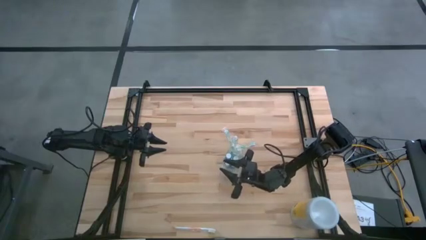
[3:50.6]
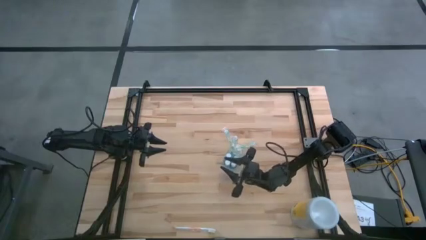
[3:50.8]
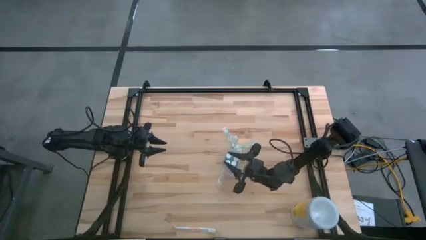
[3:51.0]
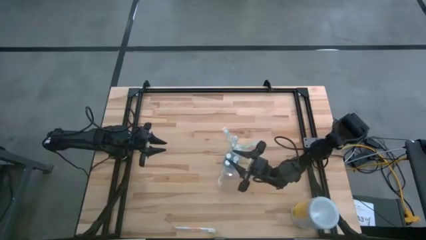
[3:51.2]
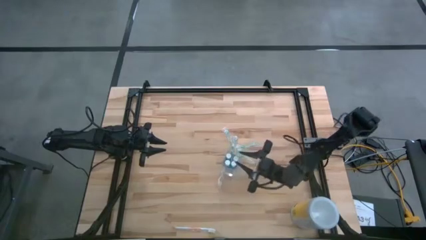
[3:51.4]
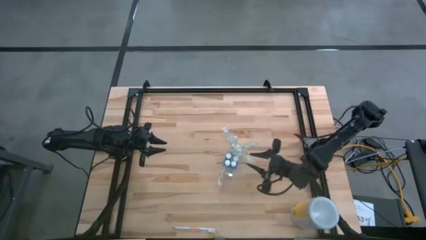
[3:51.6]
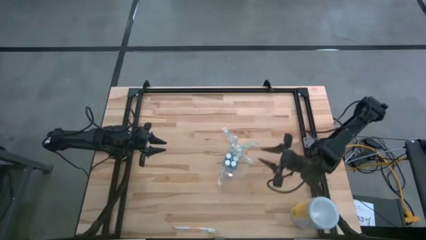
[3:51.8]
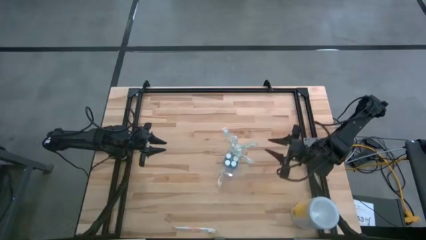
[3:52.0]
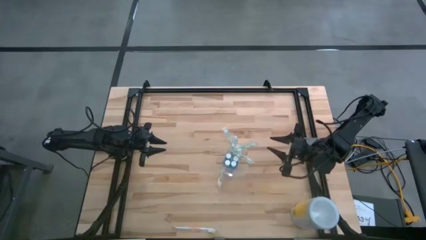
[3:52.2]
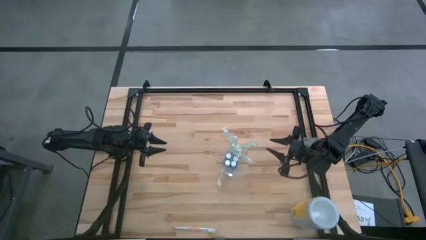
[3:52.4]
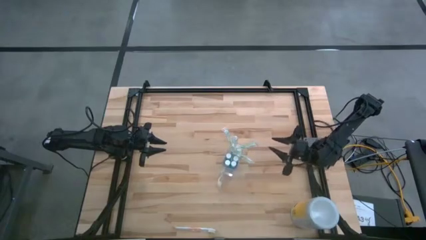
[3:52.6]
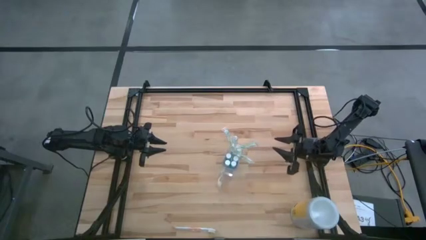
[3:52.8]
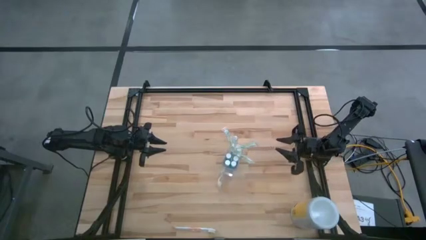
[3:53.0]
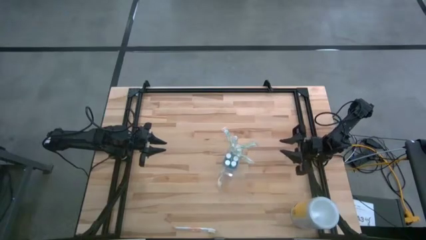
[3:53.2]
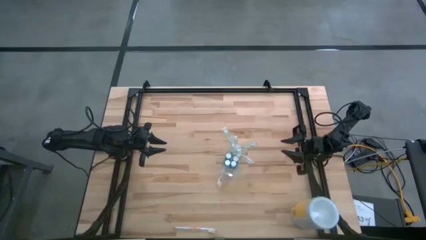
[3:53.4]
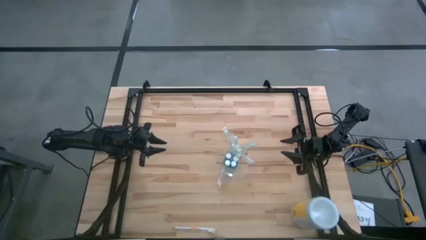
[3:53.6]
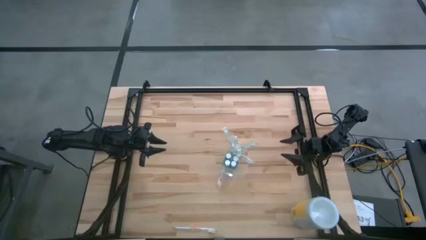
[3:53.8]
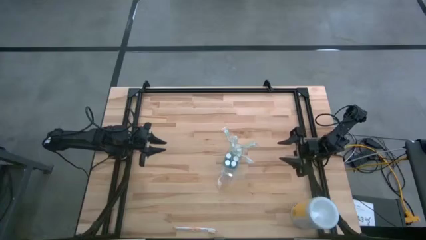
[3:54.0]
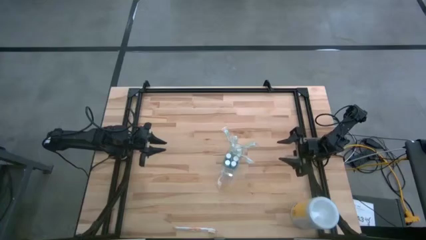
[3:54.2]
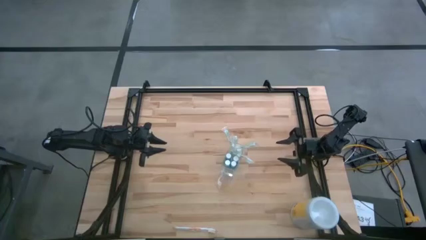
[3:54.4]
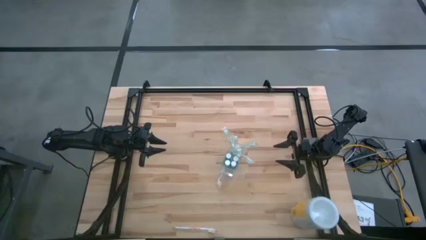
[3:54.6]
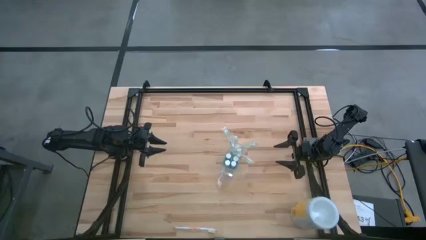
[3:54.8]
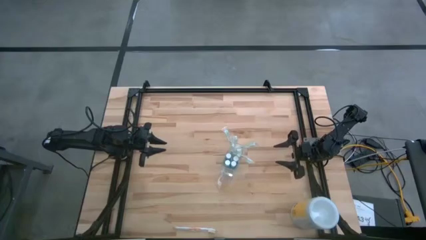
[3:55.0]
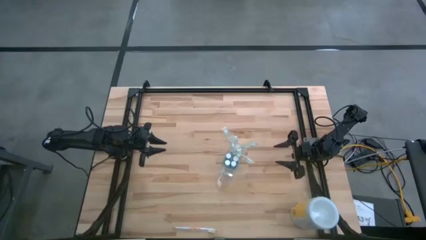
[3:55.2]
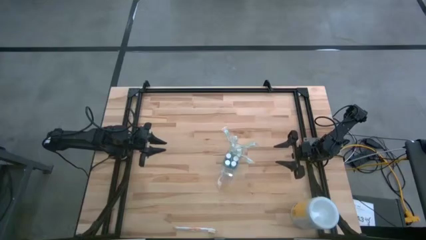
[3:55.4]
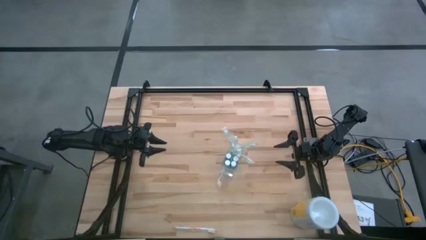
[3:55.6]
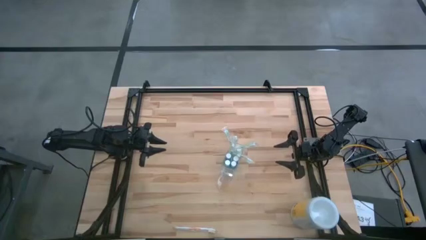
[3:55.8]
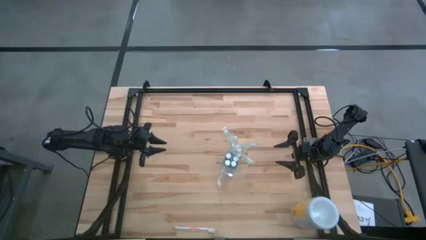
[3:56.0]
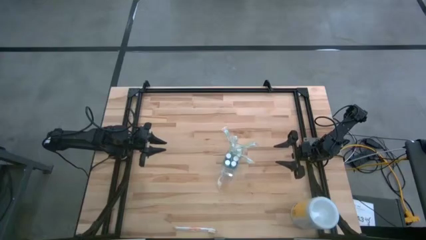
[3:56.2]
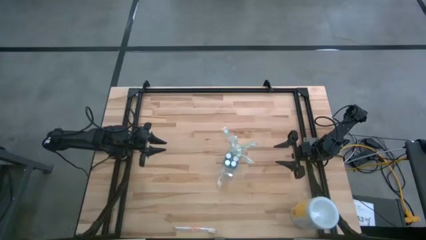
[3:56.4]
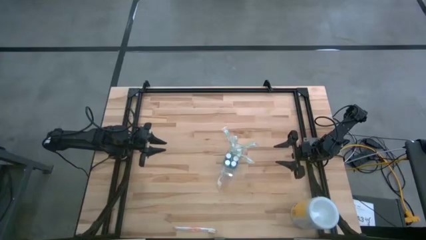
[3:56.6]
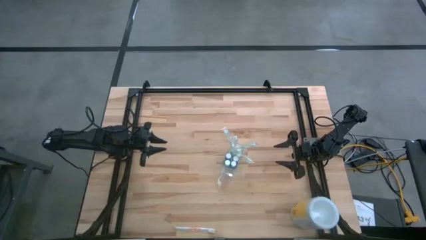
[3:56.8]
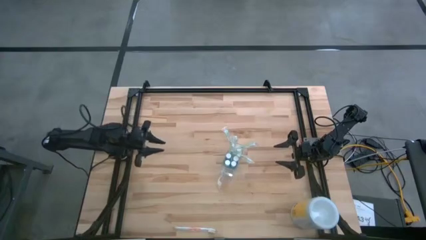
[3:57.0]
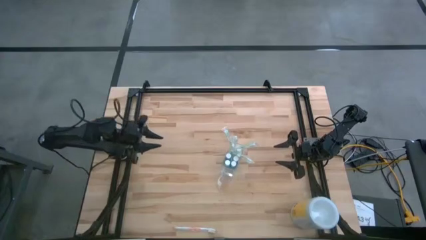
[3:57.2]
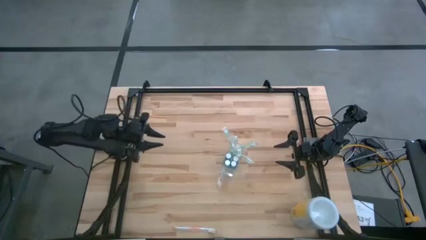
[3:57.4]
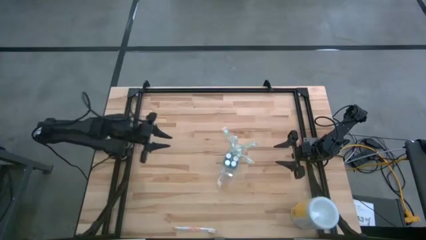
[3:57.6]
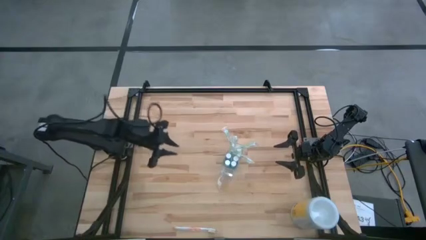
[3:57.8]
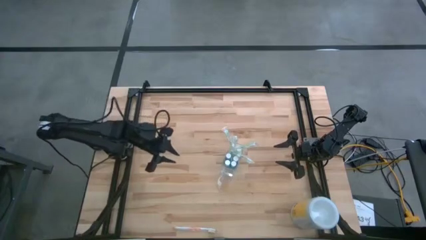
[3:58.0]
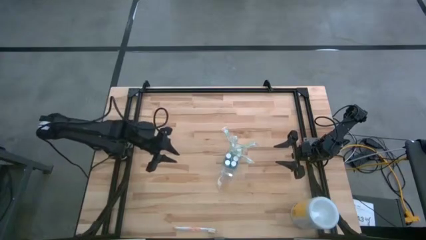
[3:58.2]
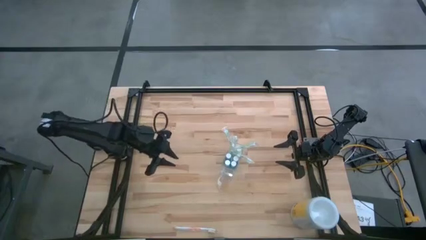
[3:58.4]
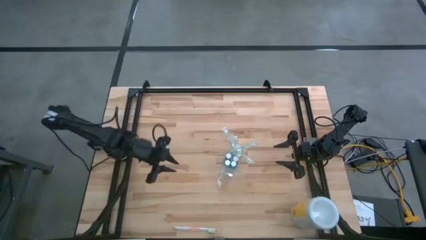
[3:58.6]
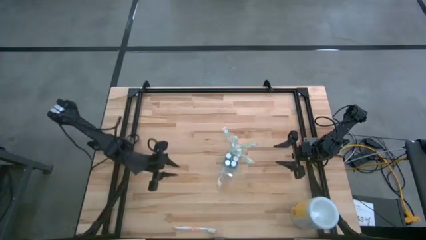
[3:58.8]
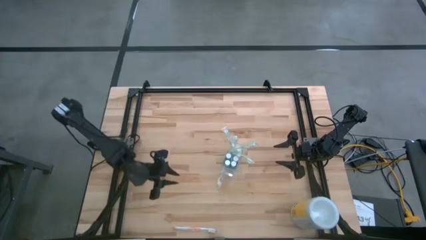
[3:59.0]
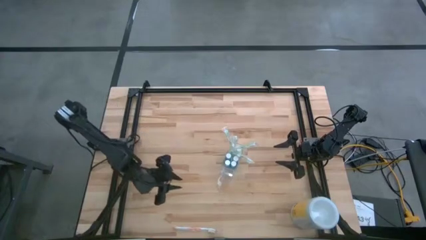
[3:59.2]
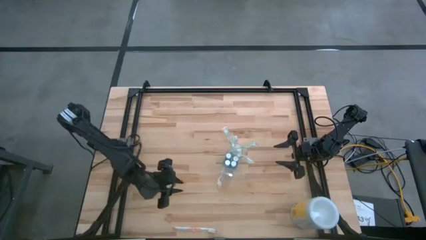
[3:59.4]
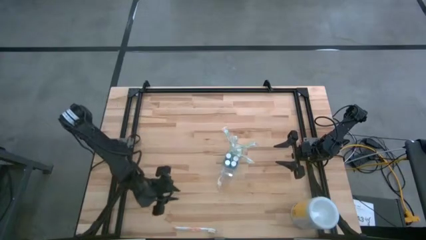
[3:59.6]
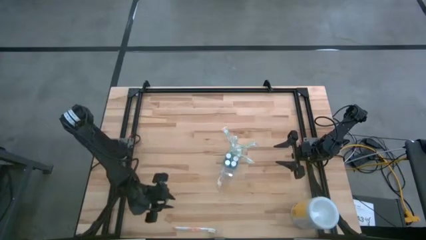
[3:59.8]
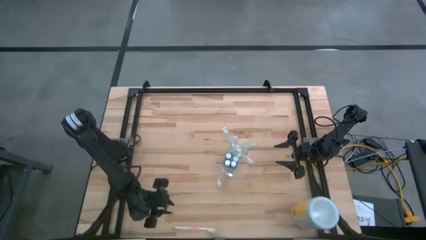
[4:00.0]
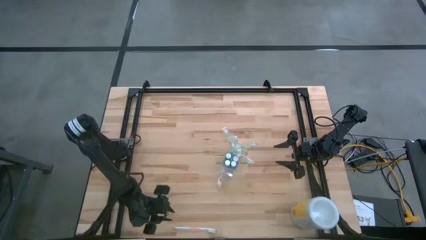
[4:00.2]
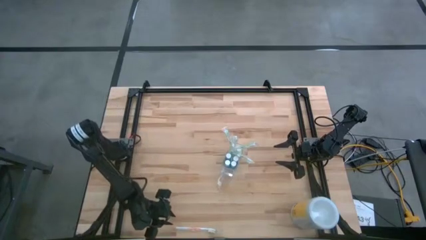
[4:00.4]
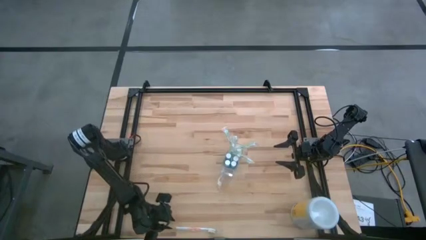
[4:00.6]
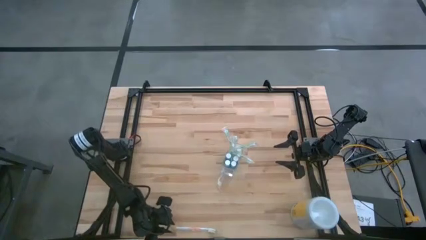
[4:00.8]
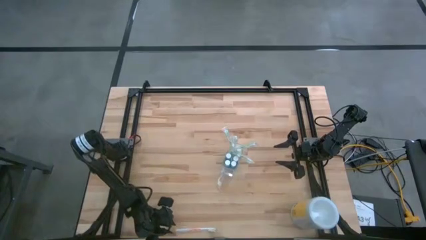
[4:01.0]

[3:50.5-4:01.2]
Task: Pick & Place toothbrushing station
Put the white orange toothbrush into the front side of the transparent organizer

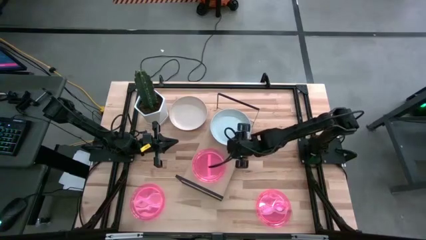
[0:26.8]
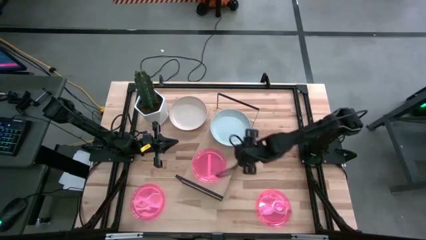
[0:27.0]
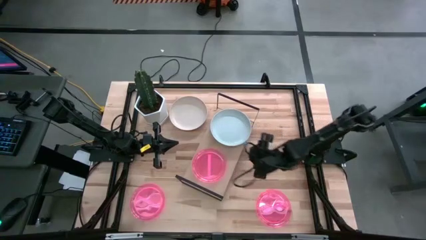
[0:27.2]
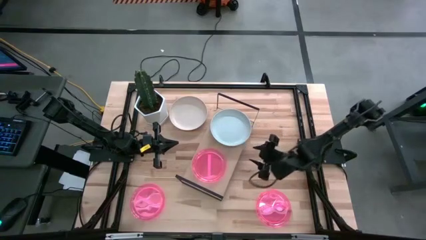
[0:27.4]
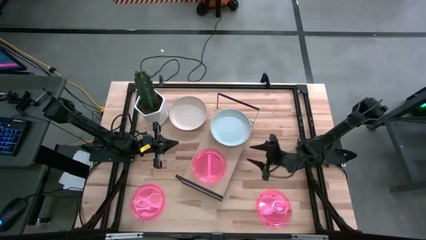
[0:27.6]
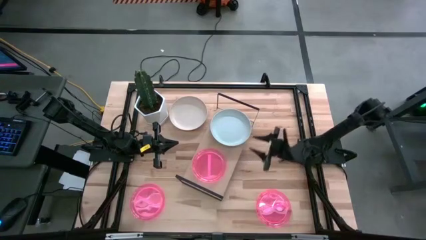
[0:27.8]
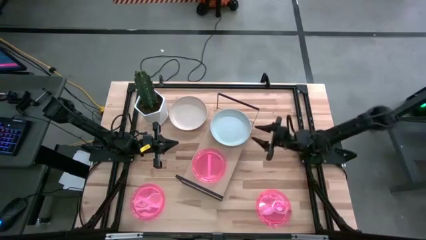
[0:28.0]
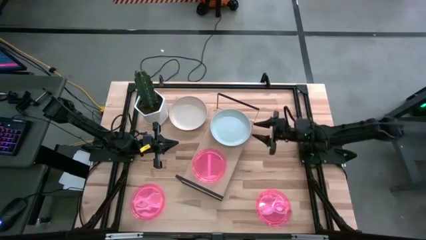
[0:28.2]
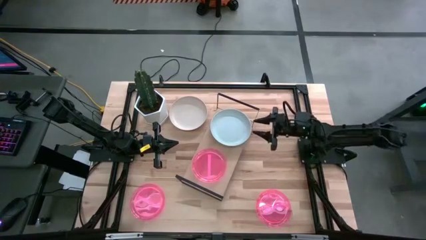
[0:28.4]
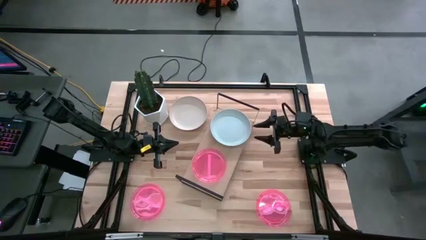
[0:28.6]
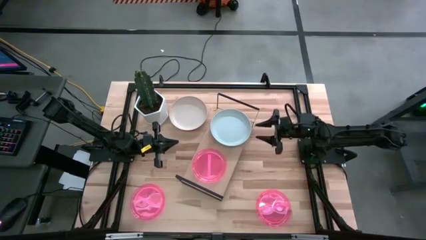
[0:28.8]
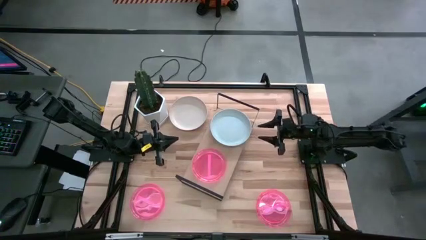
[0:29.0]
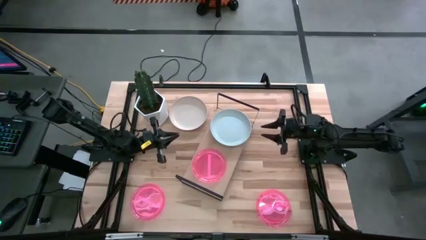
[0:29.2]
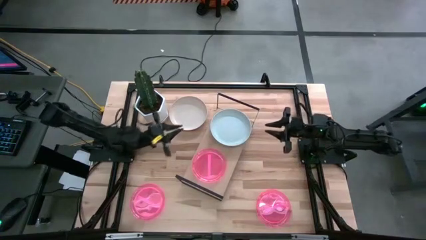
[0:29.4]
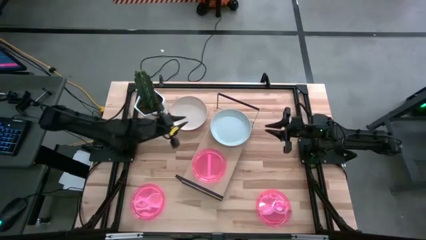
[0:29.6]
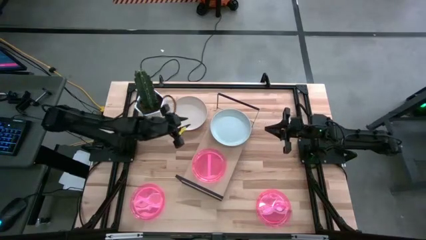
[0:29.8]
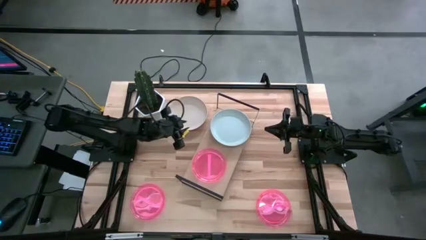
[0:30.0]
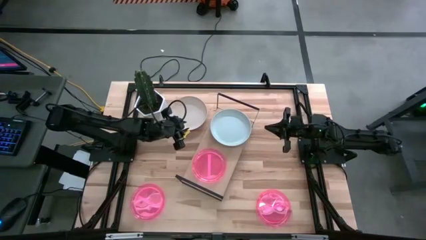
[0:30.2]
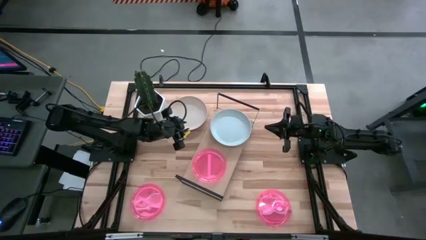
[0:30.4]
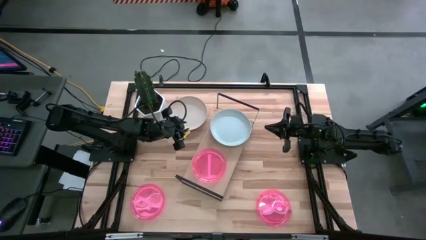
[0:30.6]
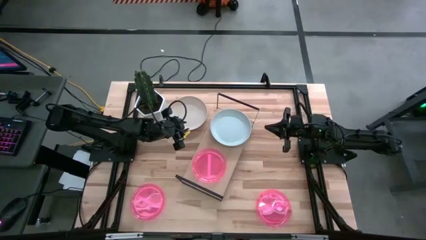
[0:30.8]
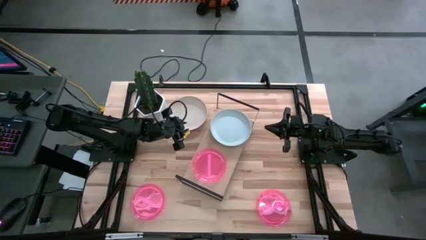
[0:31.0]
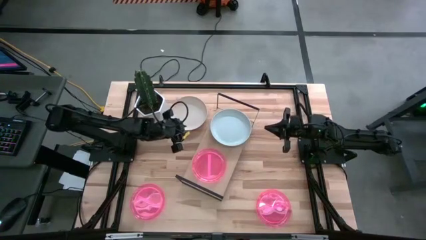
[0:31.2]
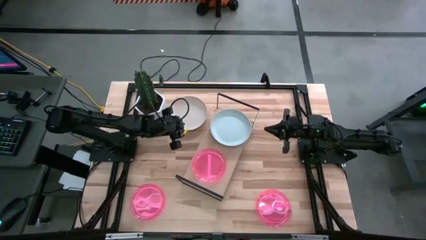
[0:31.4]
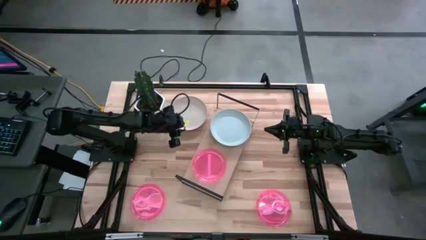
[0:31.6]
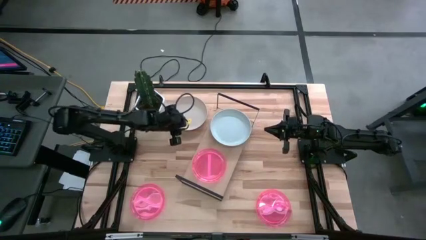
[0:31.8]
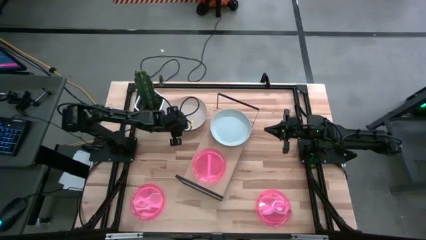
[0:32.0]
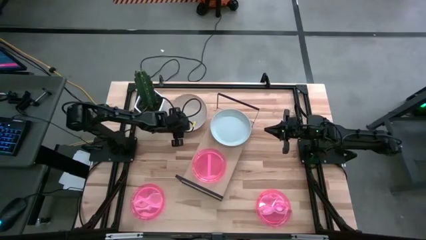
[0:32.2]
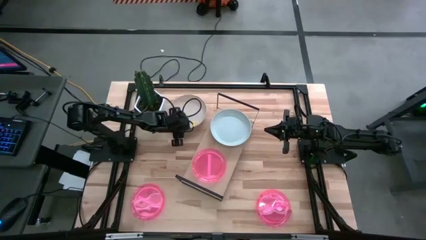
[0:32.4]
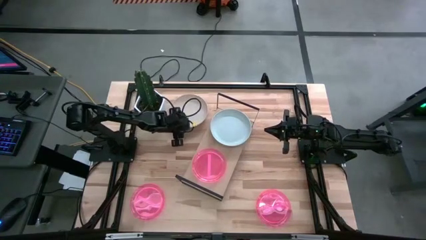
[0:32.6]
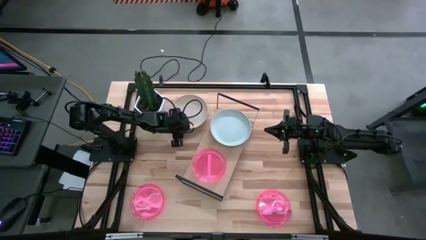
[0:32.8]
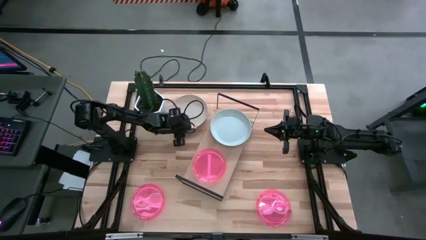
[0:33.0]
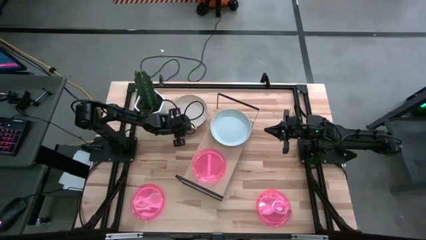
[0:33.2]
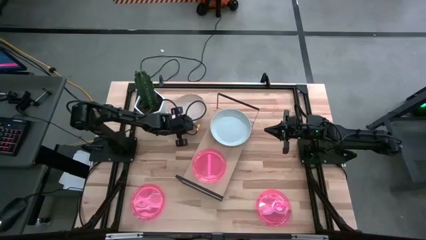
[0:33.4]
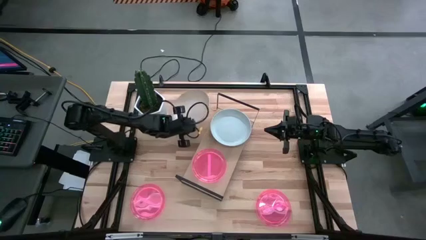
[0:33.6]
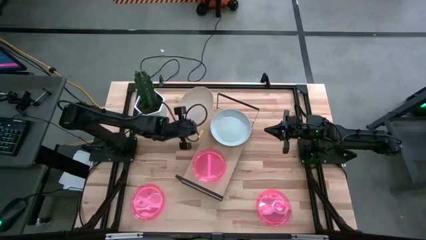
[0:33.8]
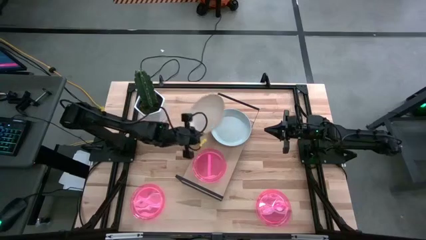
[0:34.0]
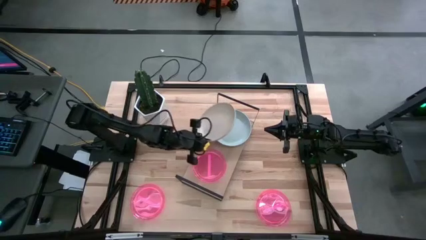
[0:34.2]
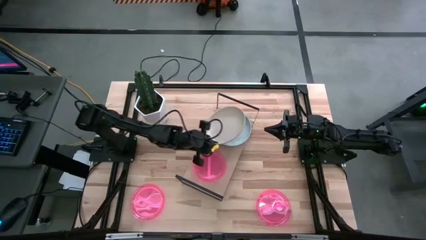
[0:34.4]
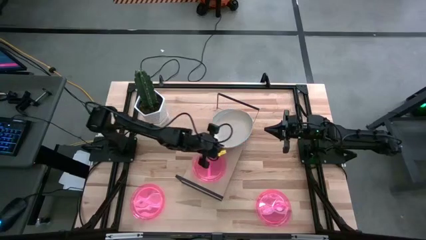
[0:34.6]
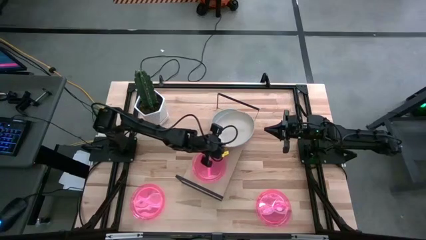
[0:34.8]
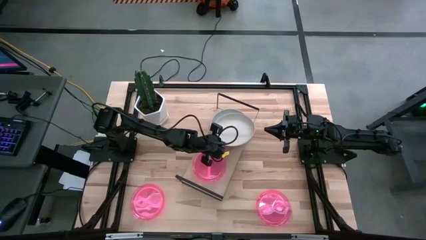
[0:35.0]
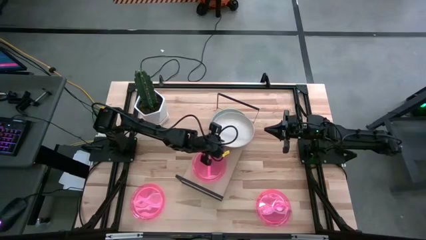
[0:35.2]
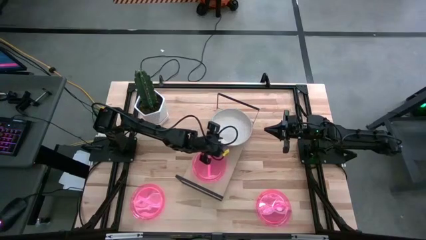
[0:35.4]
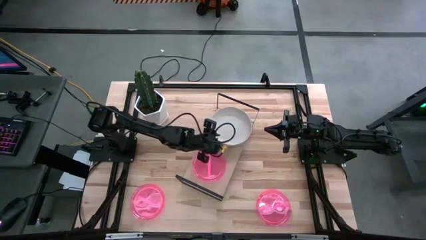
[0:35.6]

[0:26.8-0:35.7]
Task: Place and stack plates onto a shelf
Stack the white plate on top of the other white plate on the shelf
